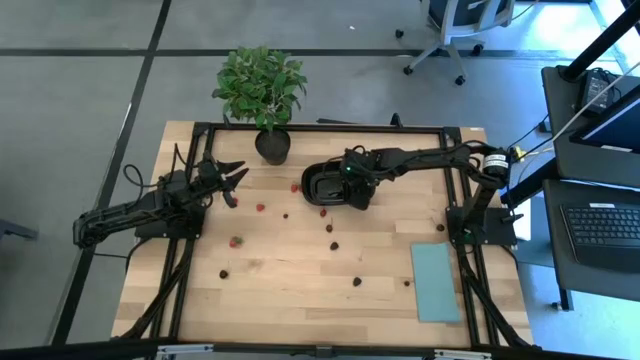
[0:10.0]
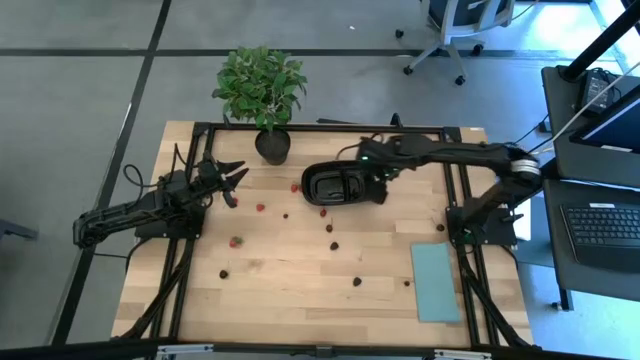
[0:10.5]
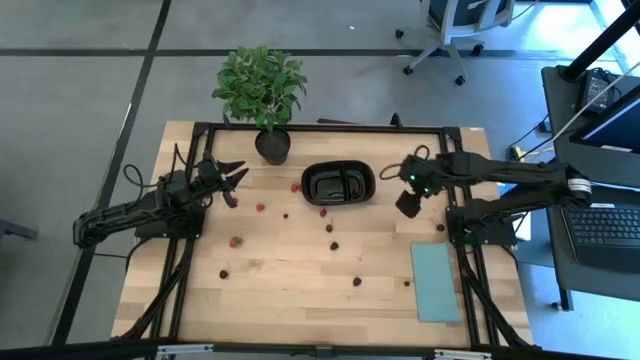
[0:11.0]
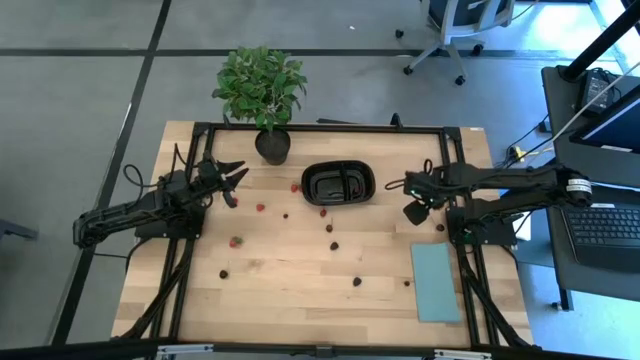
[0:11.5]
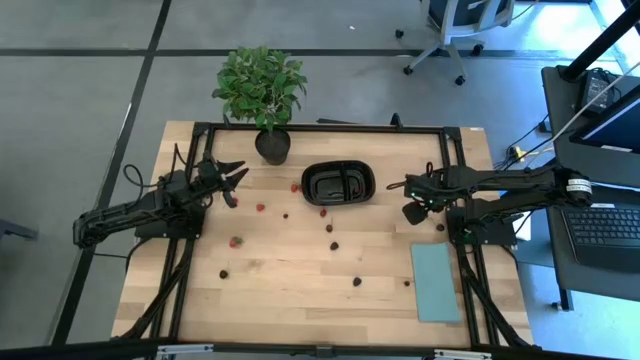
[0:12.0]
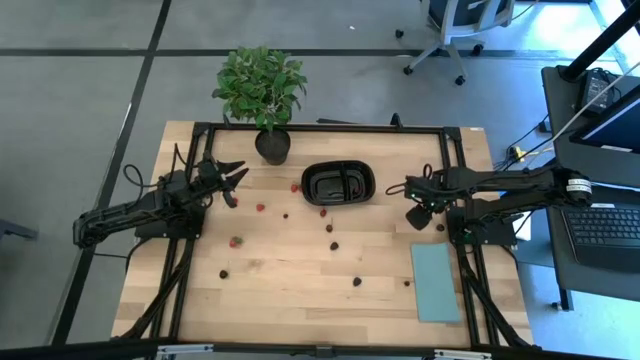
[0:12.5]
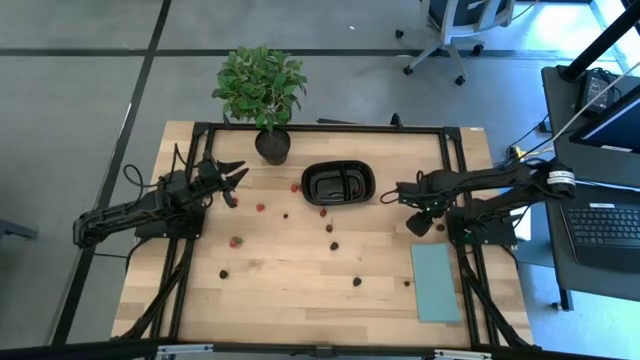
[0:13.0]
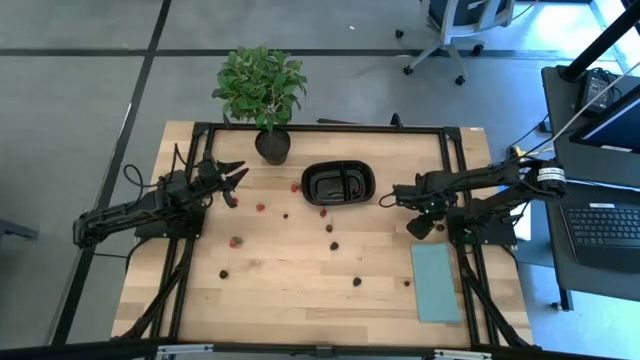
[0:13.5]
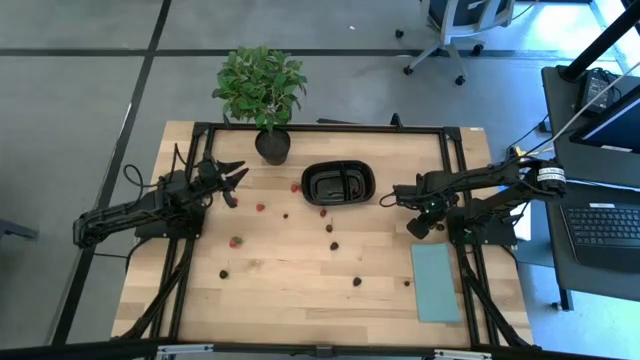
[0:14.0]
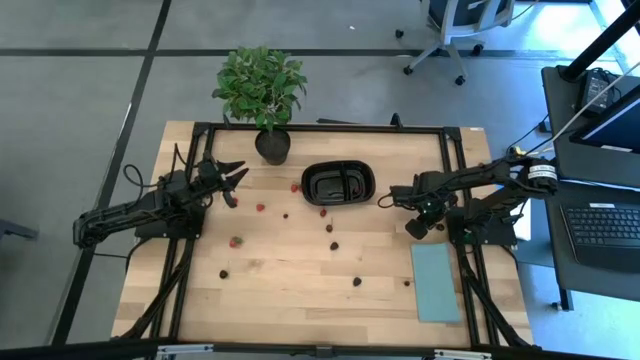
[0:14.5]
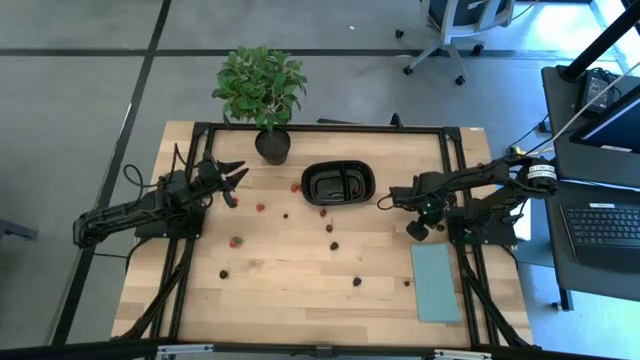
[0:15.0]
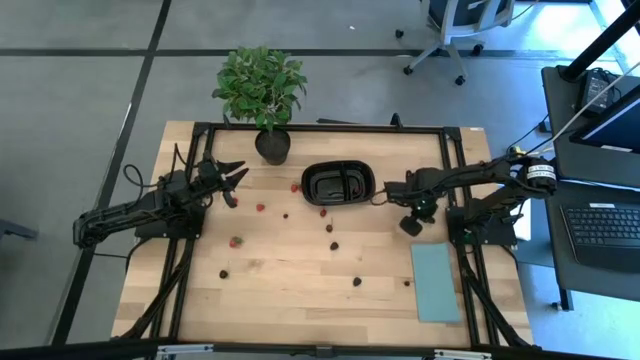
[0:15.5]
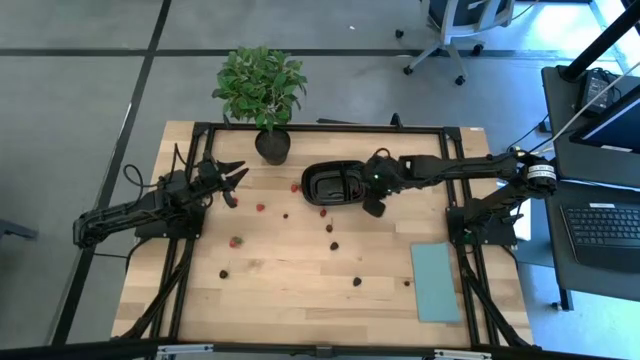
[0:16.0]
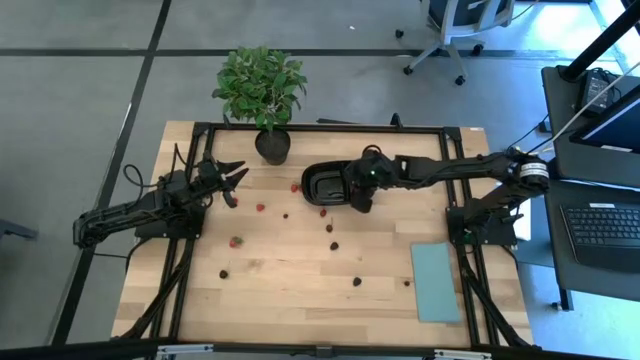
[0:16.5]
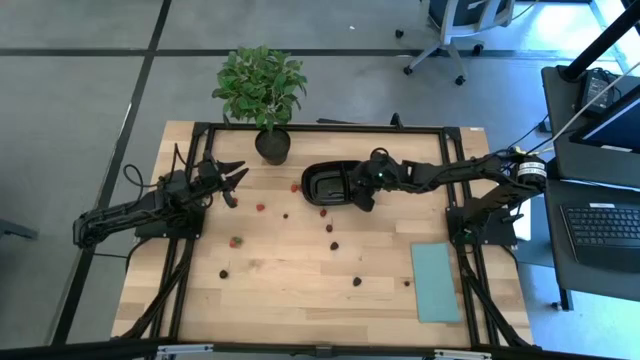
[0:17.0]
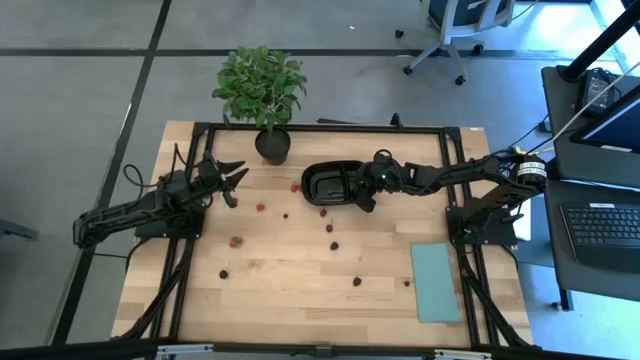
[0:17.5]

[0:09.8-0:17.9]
Task: Pick and placing Produce into tupperware
Put the right black cherry into the black container

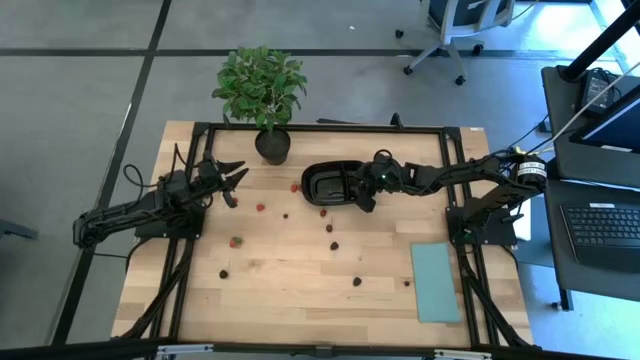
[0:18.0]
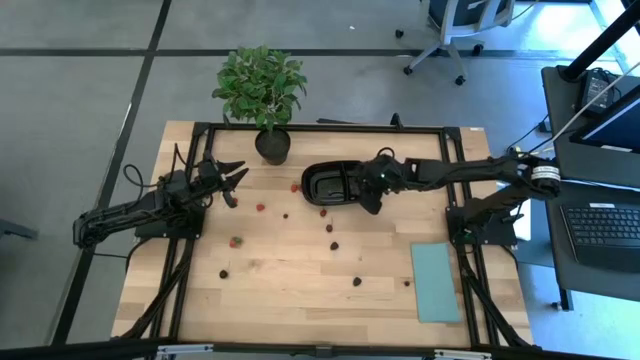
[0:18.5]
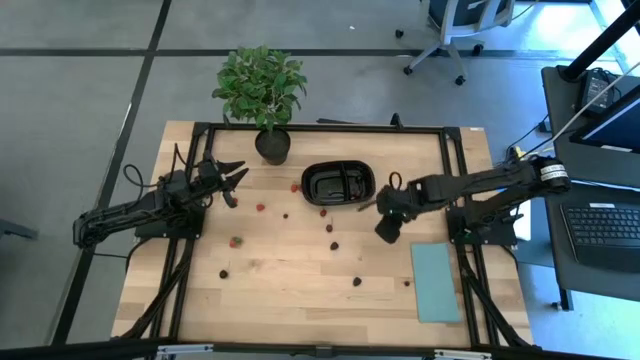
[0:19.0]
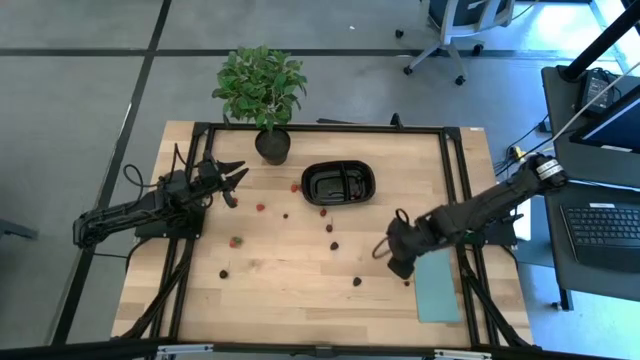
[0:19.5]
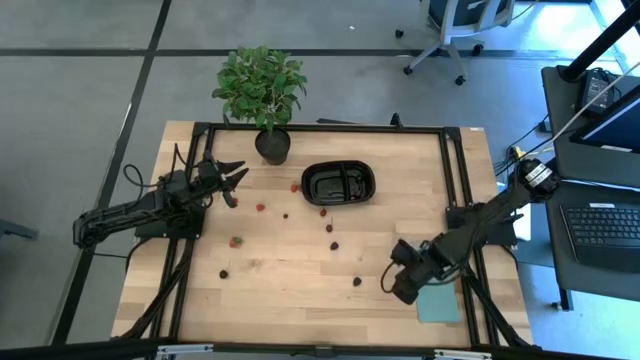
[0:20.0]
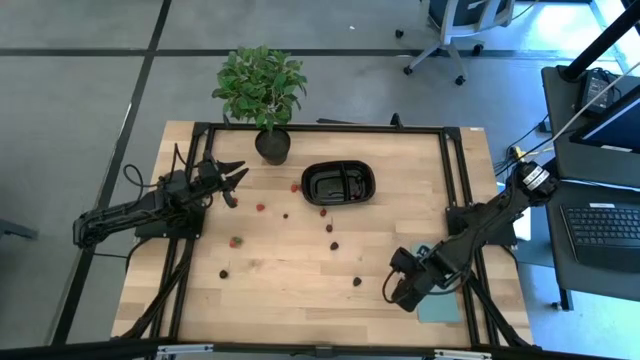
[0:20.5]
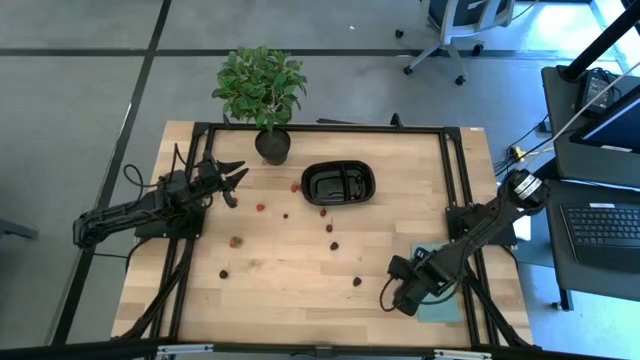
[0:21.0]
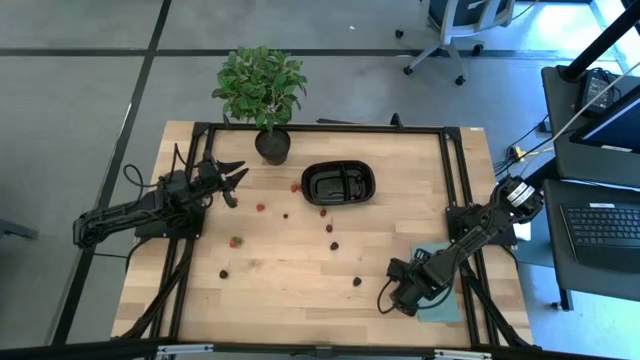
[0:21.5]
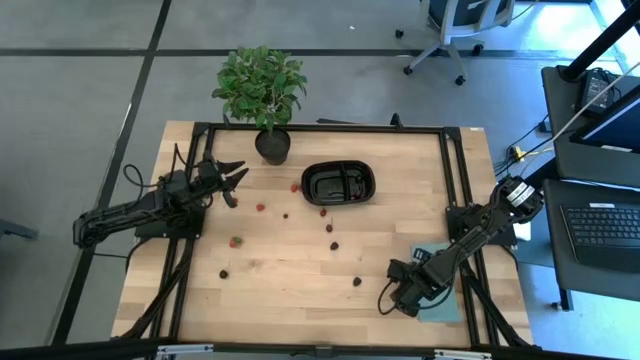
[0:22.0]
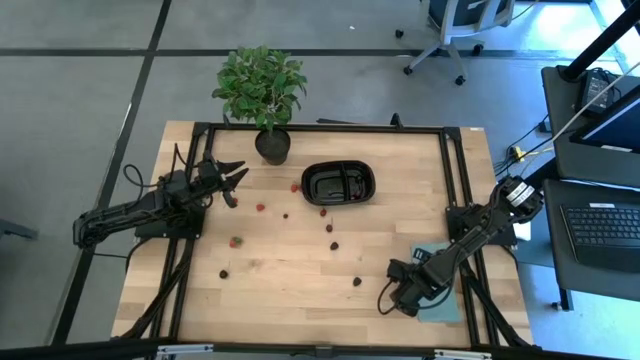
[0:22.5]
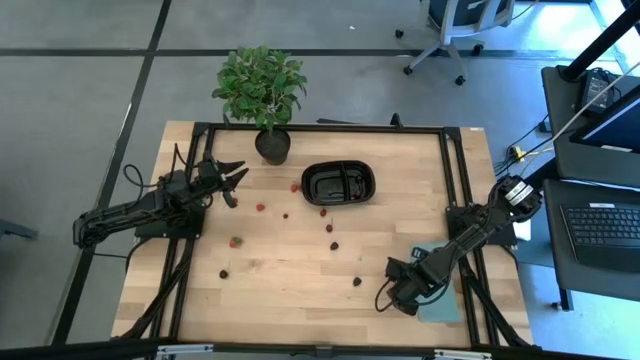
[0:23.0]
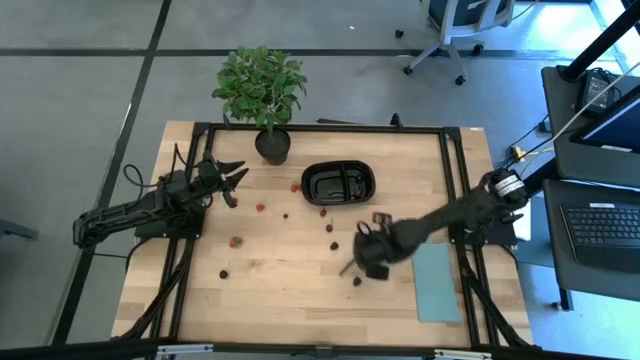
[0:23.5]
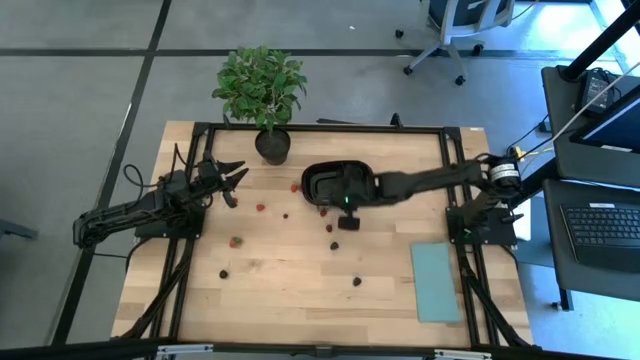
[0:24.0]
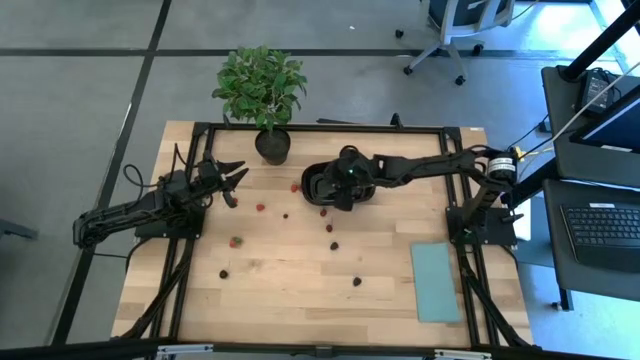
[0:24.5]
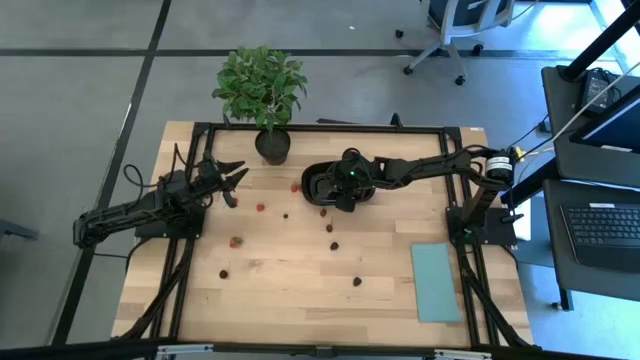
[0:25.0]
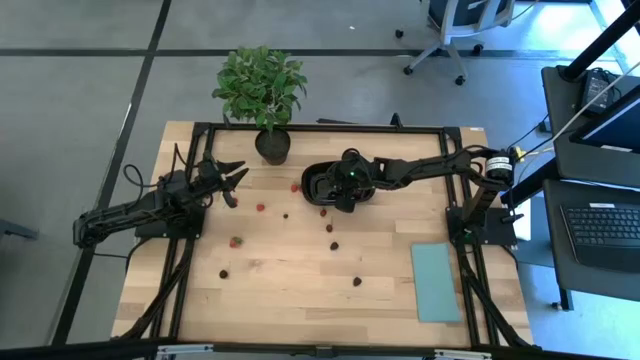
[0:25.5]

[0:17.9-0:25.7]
Put the bottom blueberry into the black container

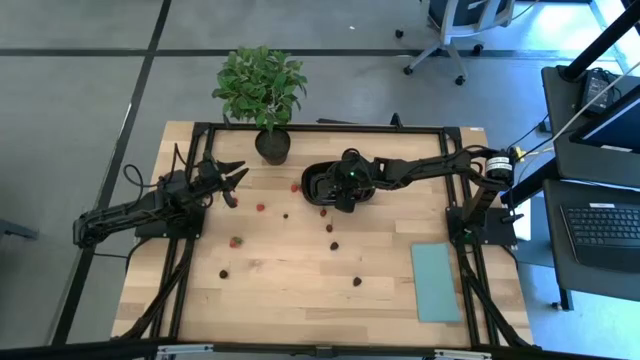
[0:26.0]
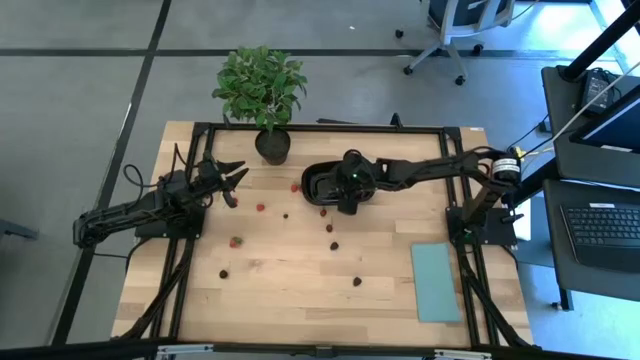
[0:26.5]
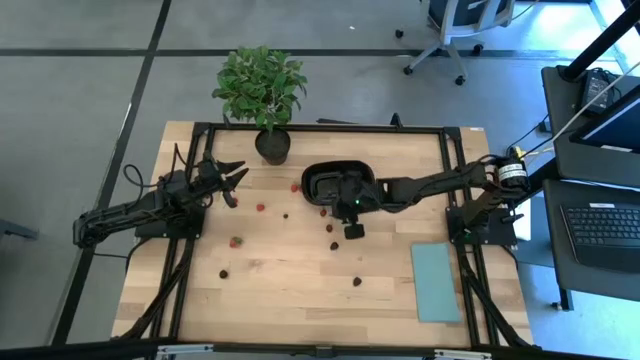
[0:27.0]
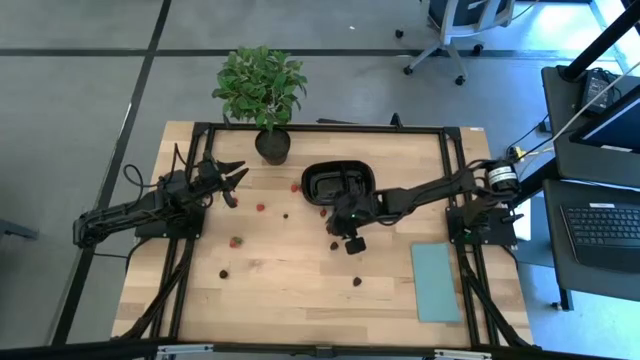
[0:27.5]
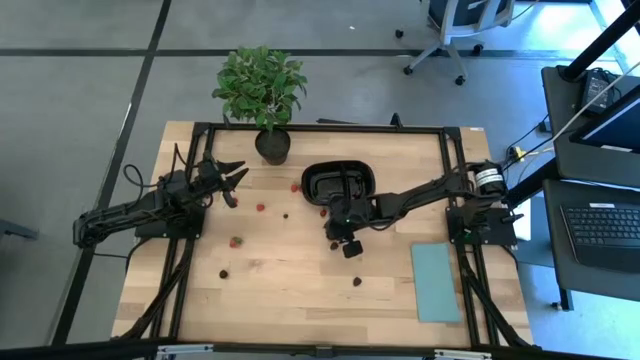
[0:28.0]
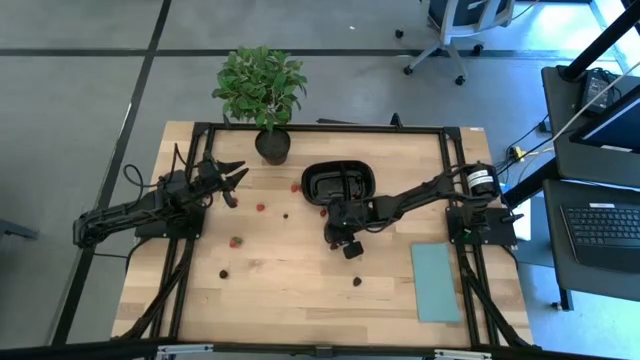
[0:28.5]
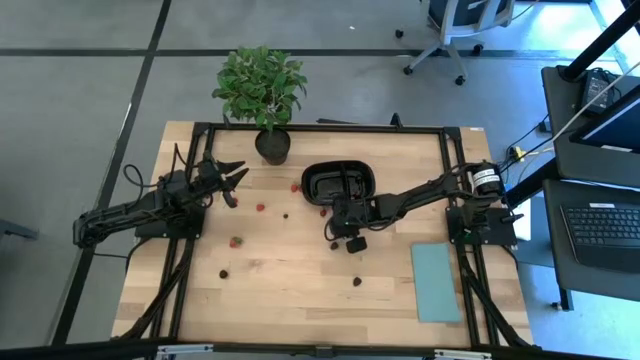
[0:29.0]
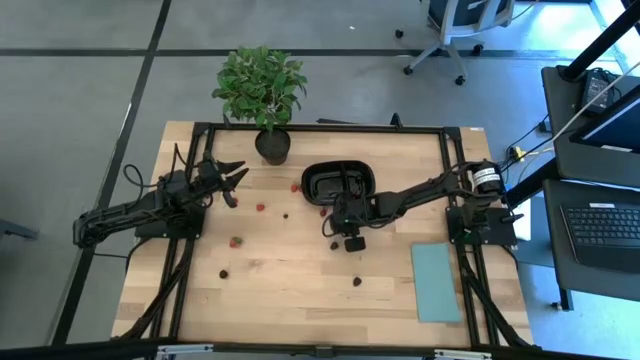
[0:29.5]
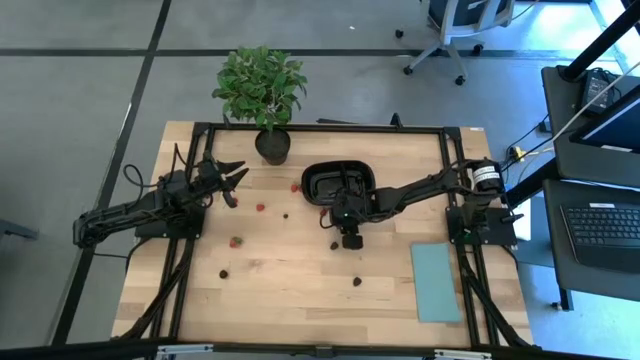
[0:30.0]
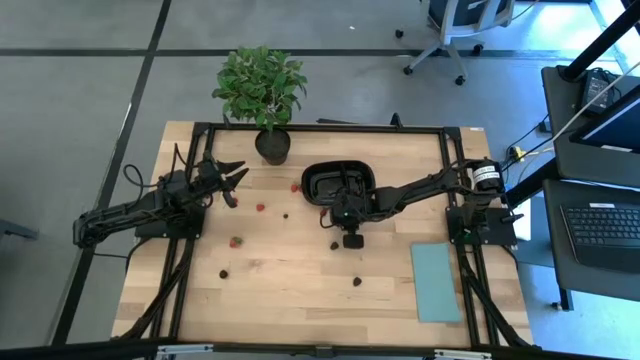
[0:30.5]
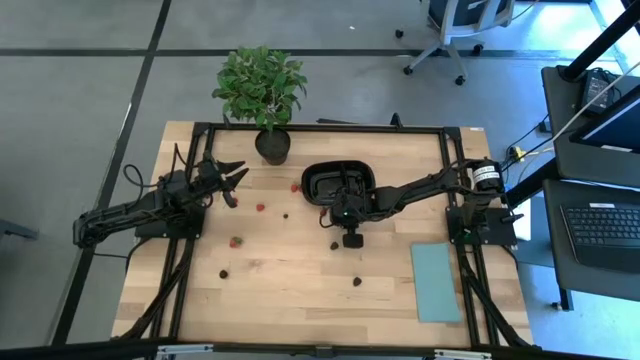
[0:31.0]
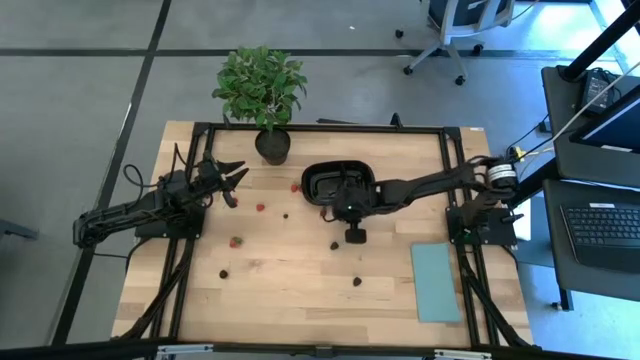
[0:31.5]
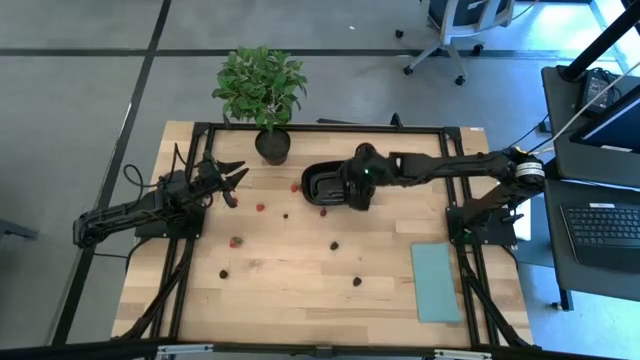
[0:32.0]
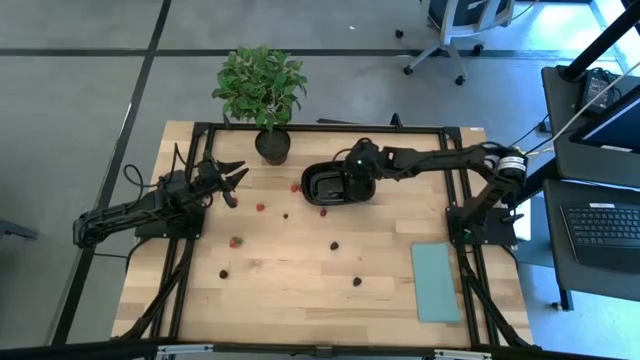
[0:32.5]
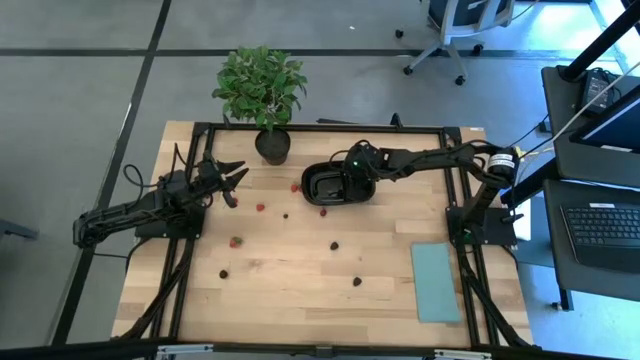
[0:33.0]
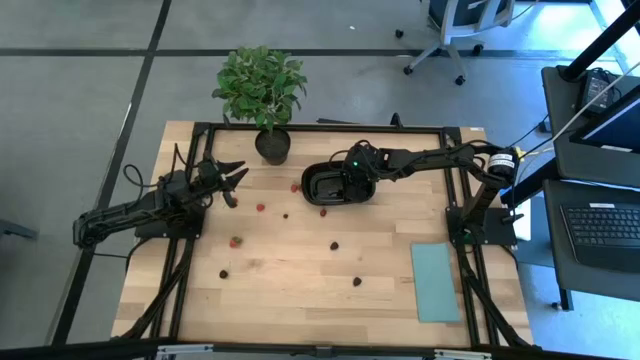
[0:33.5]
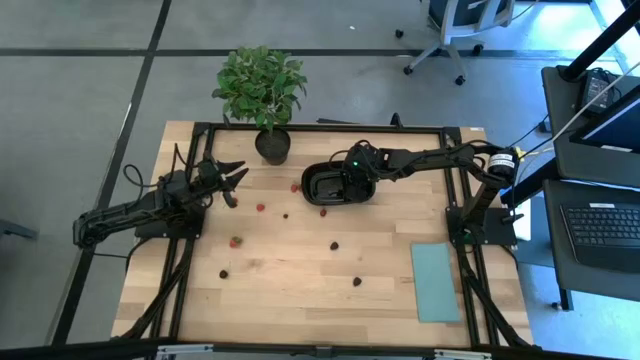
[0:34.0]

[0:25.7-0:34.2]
Put the bottom red cherry into the black container
